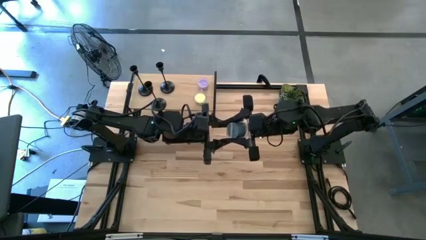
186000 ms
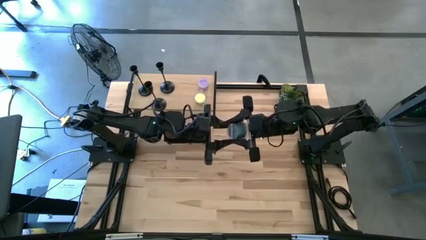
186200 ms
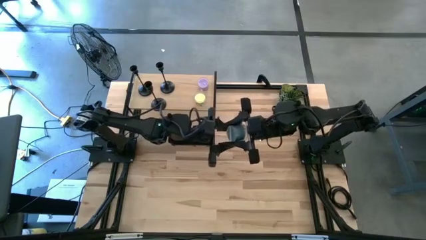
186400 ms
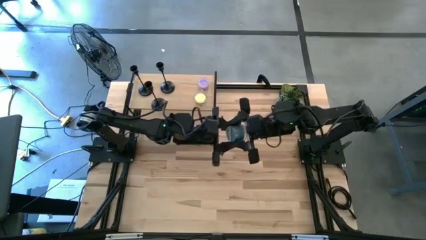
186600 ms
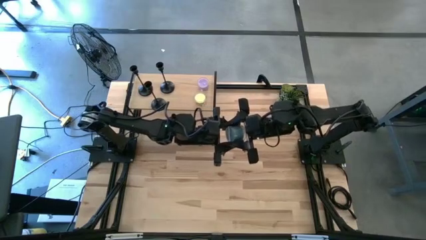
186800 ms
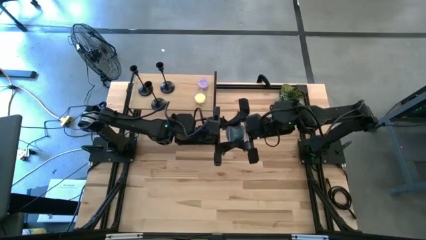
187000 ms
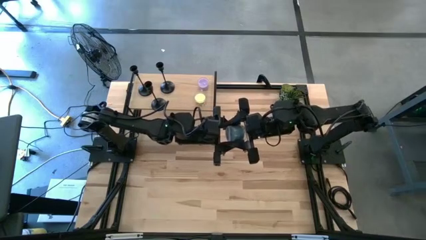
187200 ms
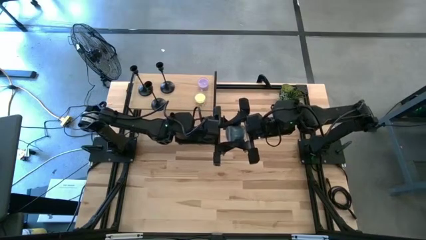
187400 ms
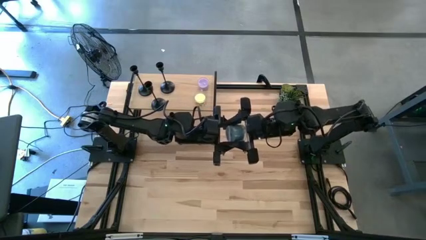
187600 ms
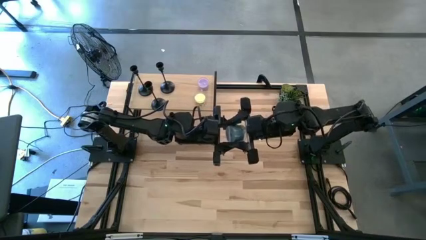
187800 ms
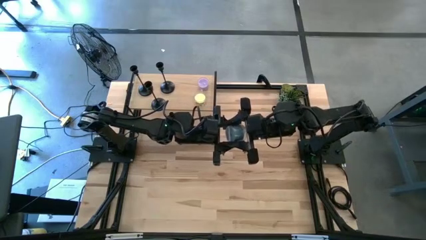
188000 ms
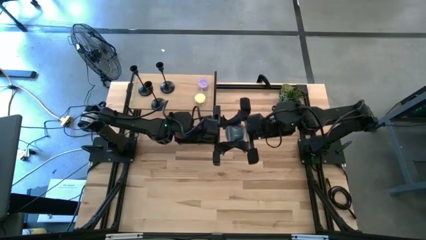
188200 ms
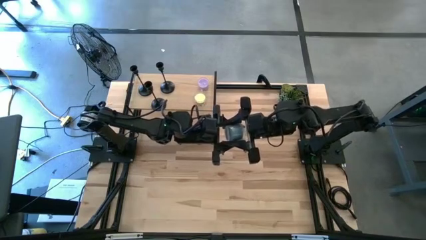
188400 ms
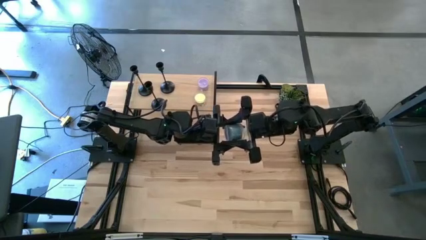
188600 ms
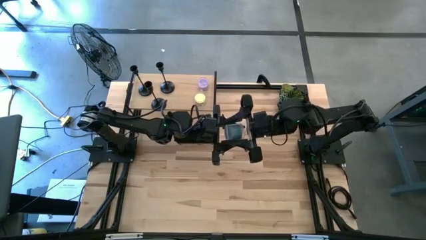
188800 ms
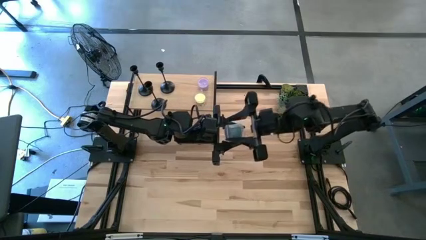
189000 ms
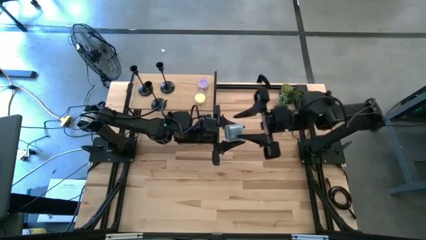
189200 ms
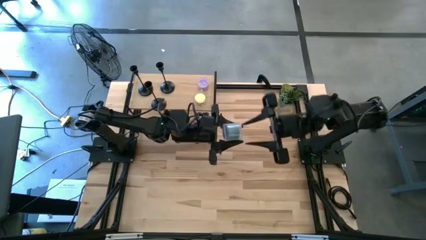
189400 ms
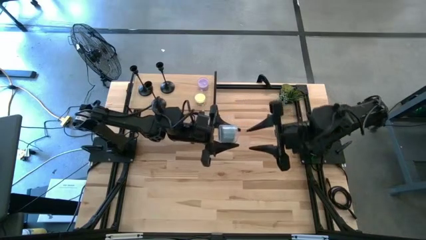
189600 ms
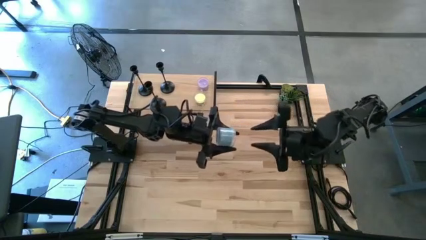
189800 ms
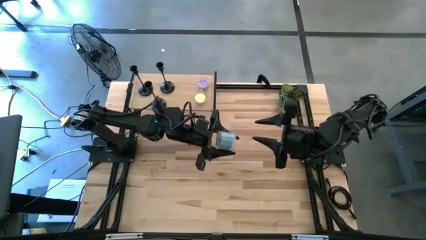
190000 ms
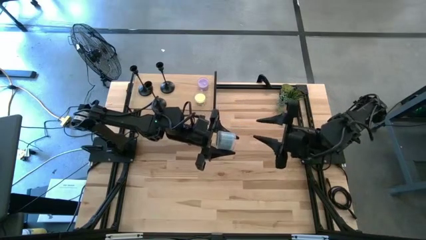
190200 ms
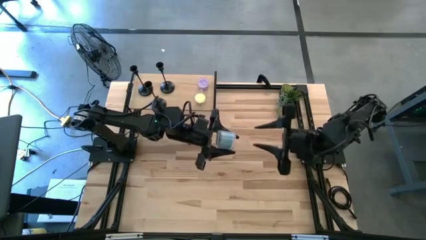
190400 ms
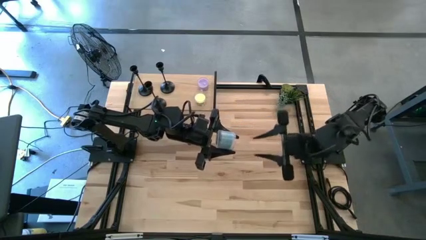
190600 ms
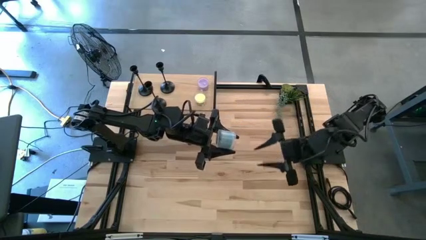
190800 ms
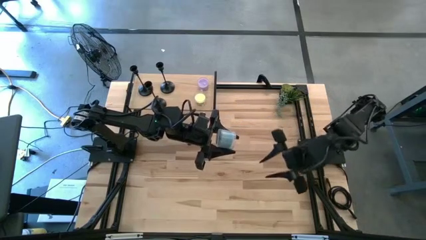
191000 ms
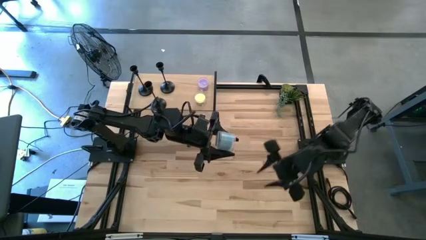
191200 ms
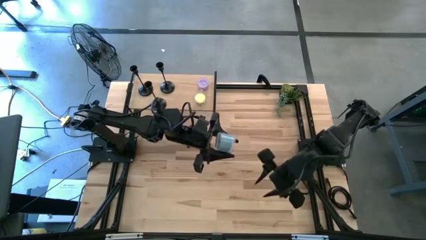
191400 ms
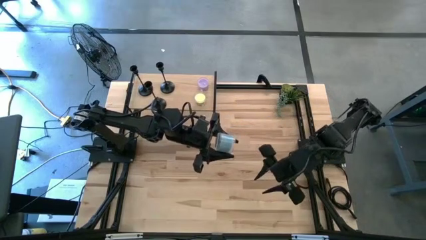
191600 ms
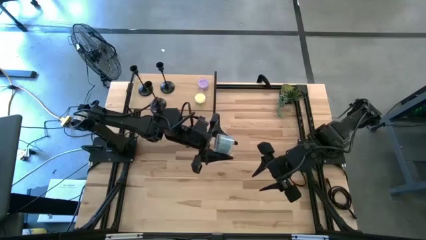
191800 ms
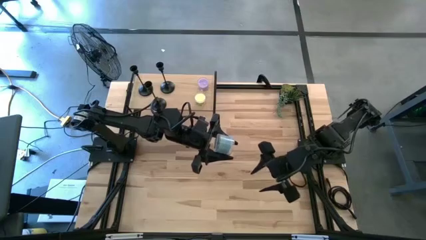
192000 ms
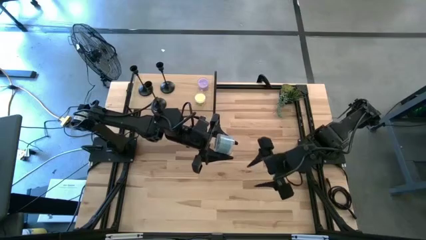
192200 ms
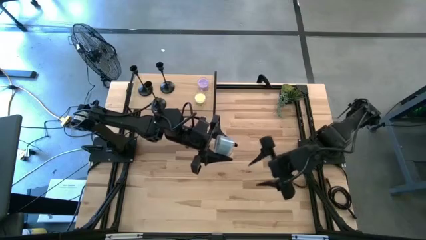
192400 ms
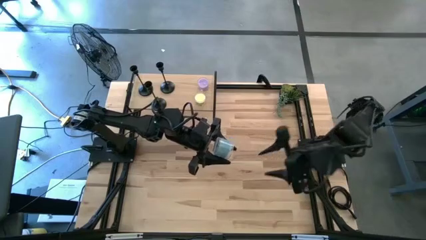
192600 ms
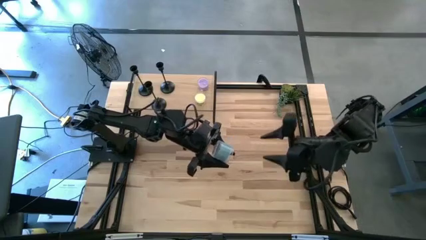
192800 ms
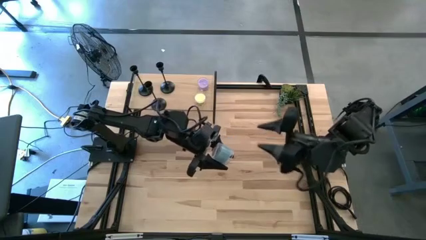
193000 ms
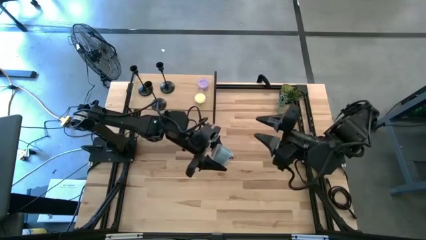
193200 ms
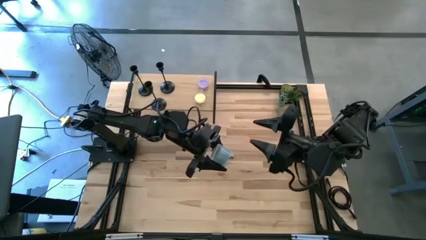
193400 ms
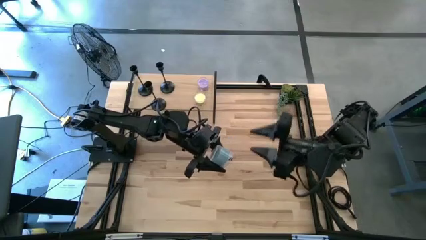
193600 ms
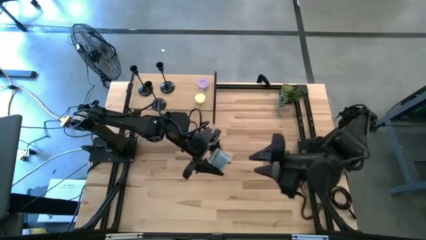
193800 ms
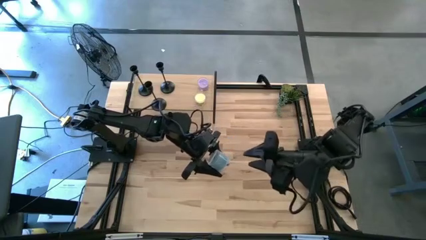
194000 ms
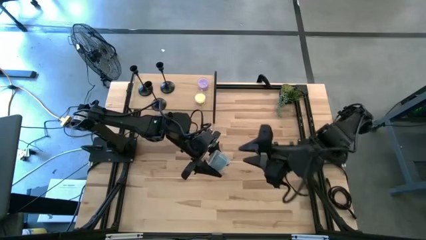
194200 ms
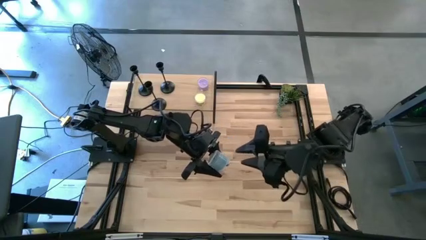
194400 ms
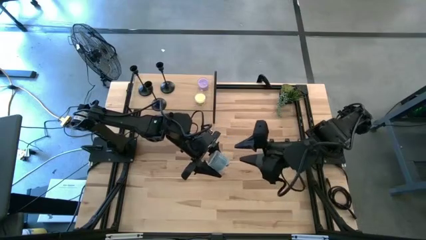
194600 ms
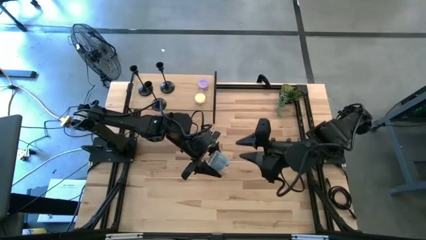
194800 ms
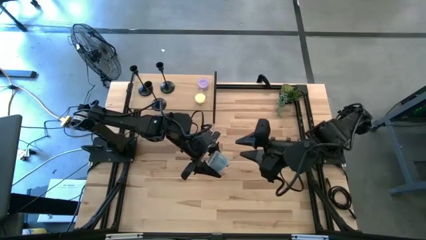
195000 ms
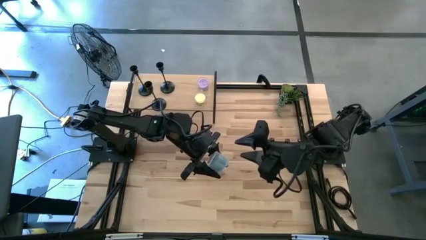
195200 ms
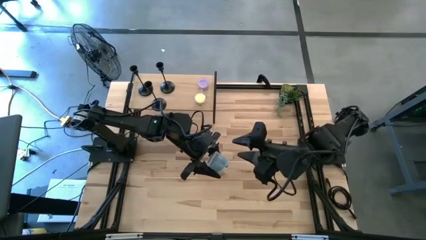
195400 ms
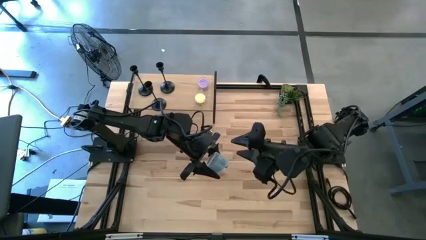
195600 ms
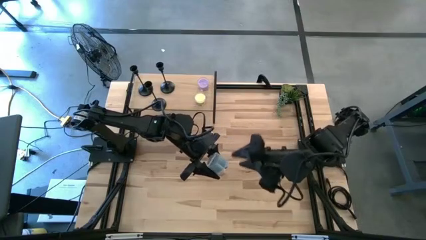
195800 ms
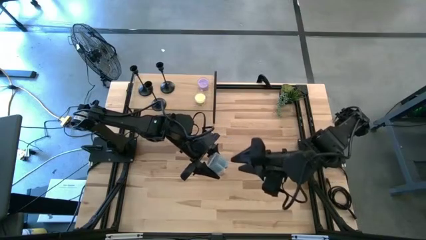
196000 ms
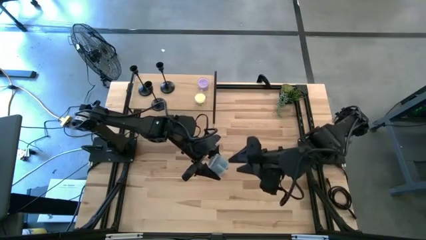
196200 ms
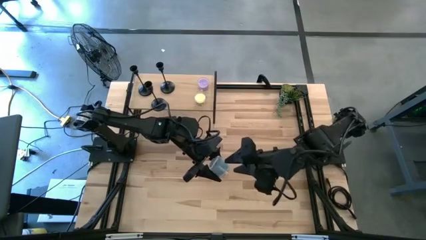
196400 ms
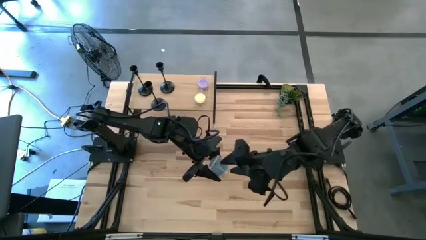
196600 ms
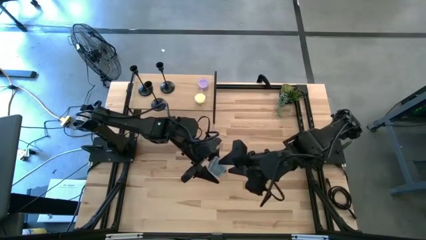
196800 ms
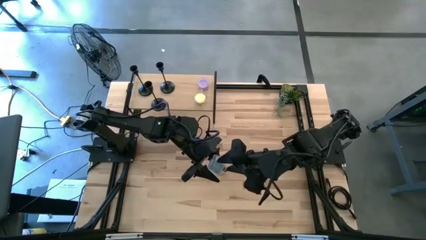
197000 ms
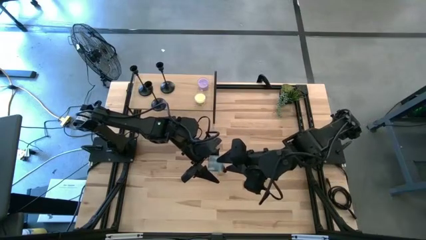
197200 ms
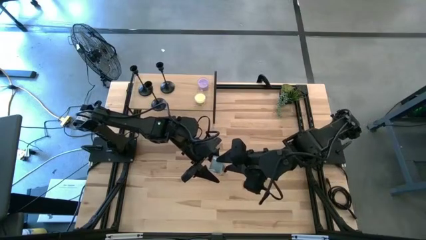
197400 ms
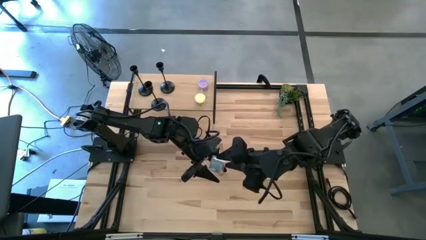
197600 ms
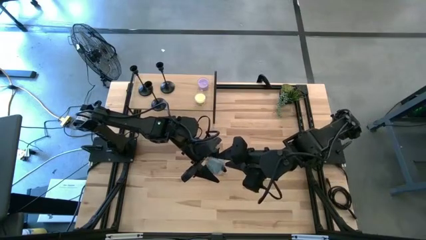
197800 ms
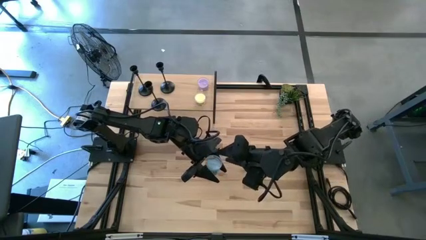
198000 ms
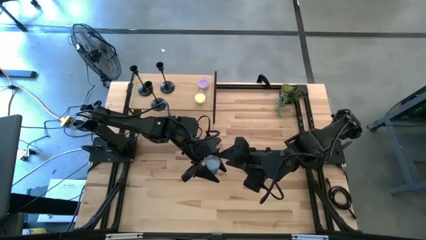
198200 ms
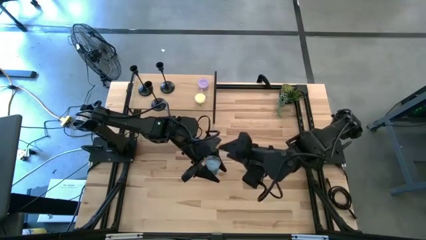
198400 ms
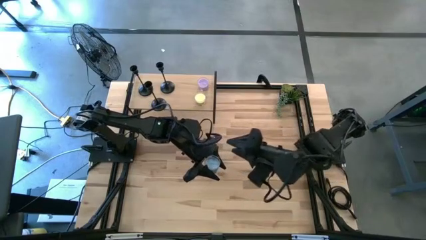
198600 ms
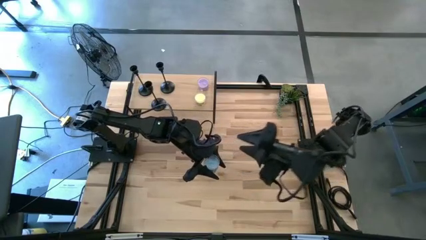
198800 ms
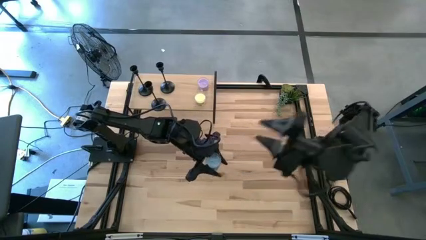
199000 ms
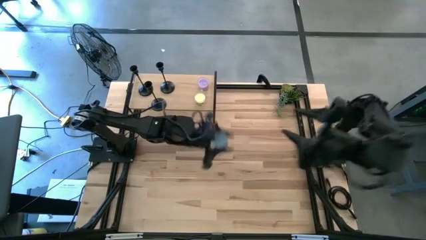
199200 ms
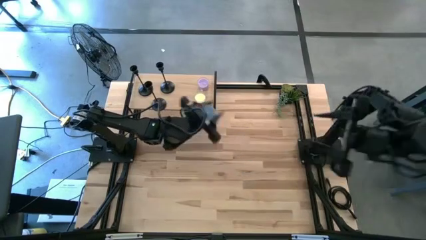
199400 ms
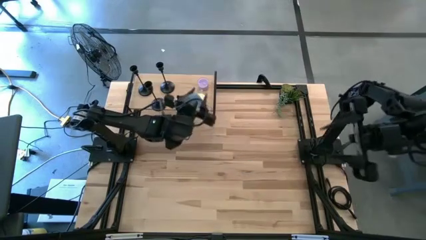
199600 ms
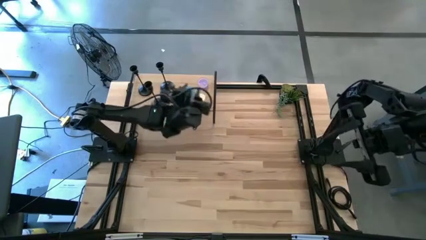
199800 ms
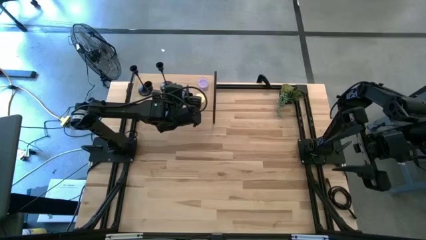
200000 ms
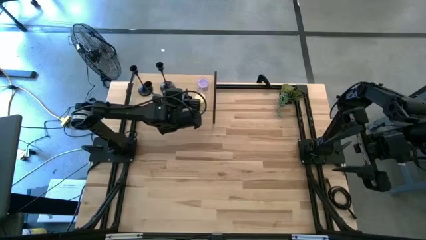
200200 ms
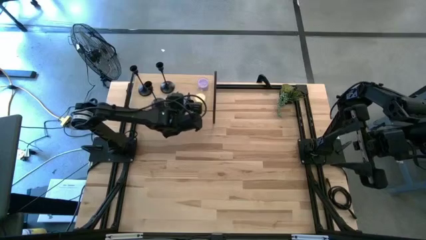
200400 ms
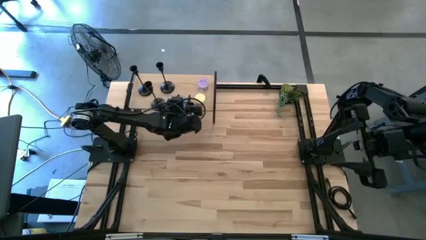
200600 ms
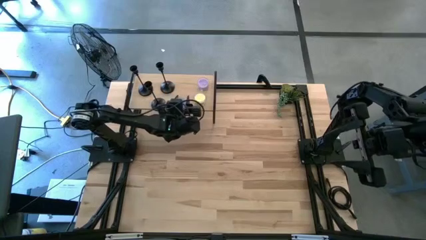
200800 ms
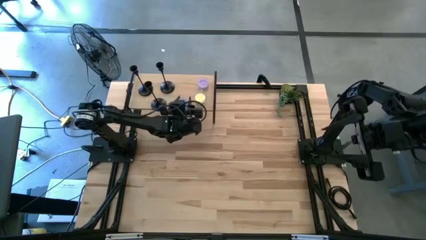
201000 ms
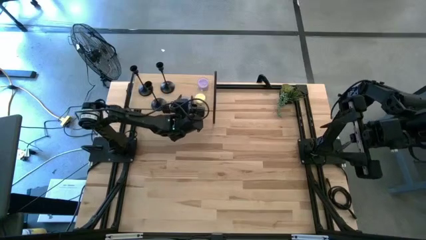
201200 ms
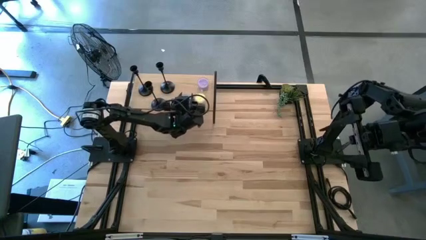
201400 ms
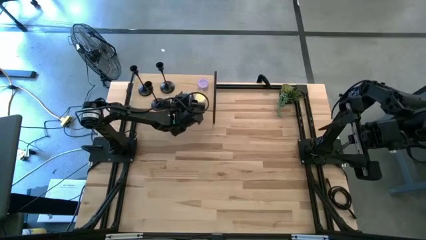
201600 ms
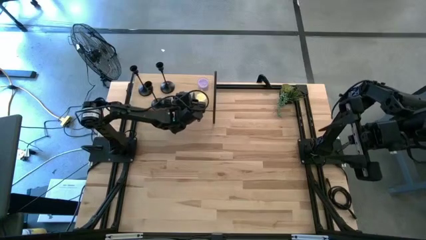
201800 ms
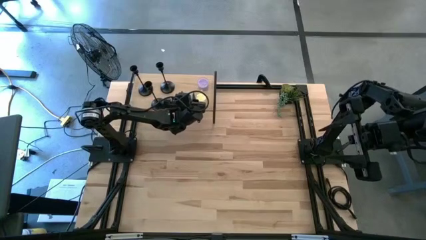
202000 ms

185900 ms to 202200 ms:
Task: Pick & Place candle stick holders
Put the blue candle on the shelf
